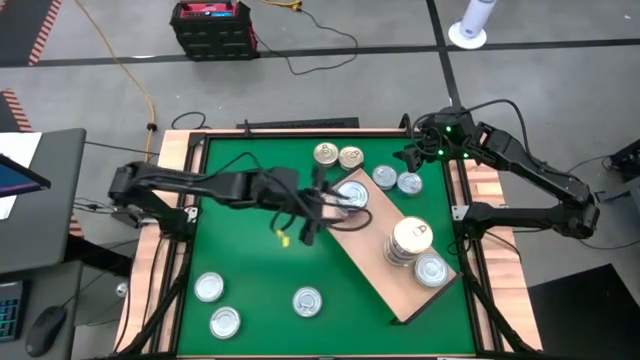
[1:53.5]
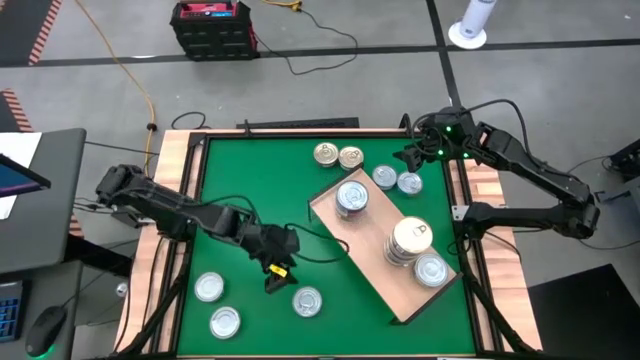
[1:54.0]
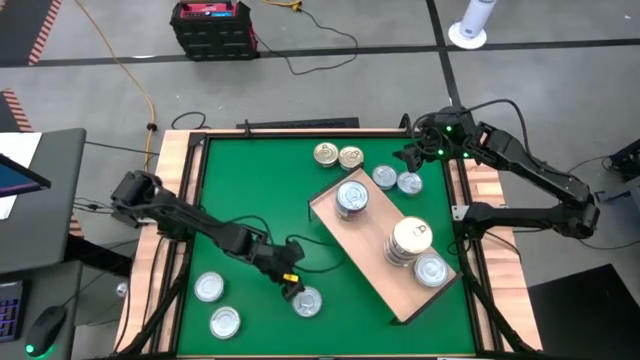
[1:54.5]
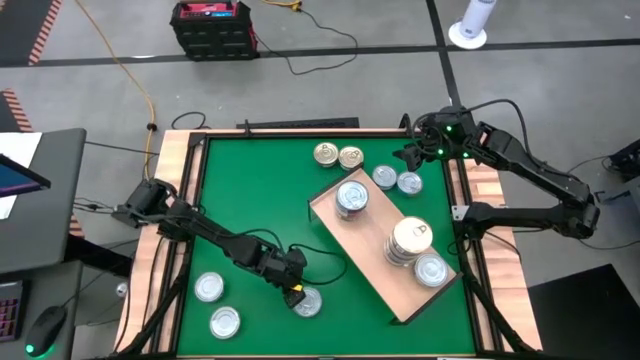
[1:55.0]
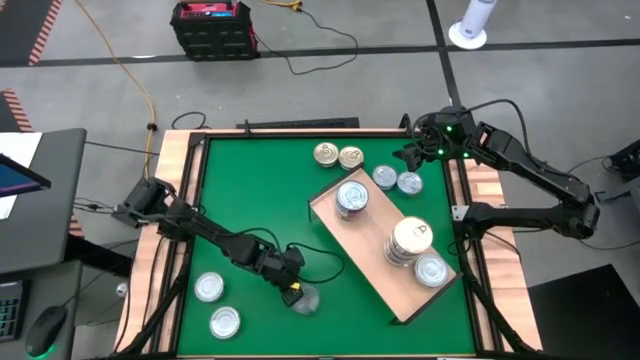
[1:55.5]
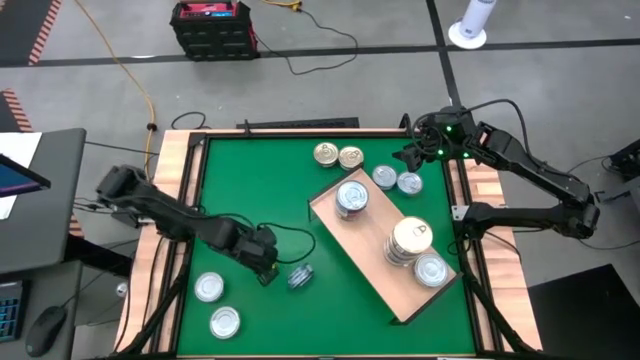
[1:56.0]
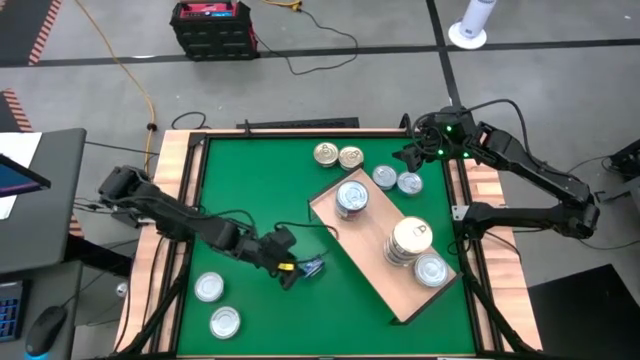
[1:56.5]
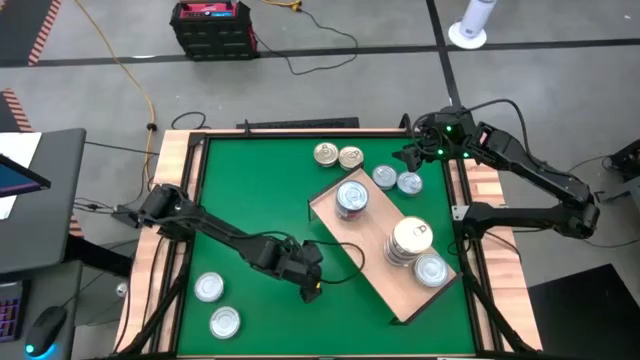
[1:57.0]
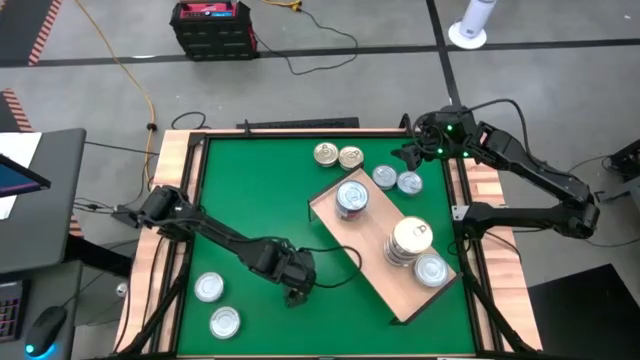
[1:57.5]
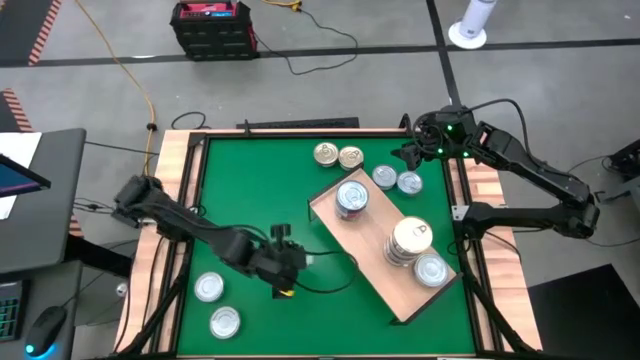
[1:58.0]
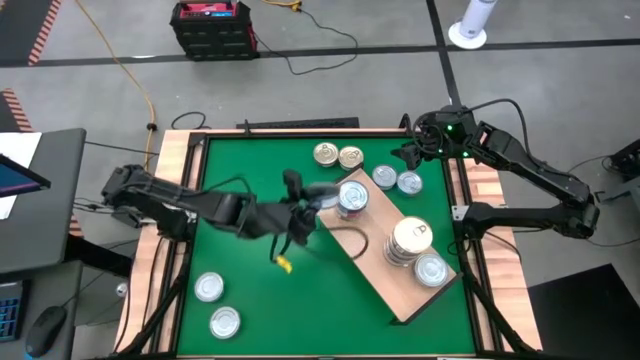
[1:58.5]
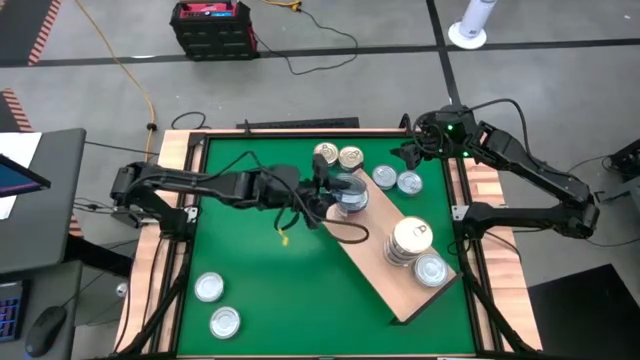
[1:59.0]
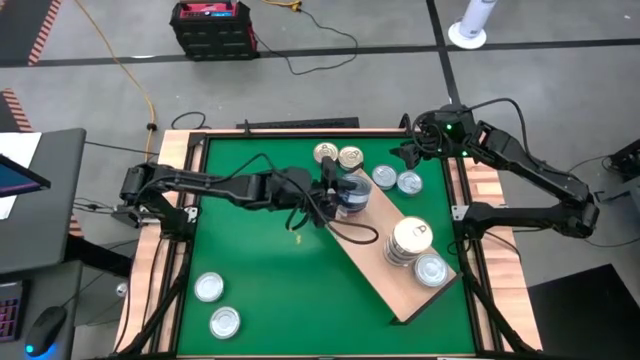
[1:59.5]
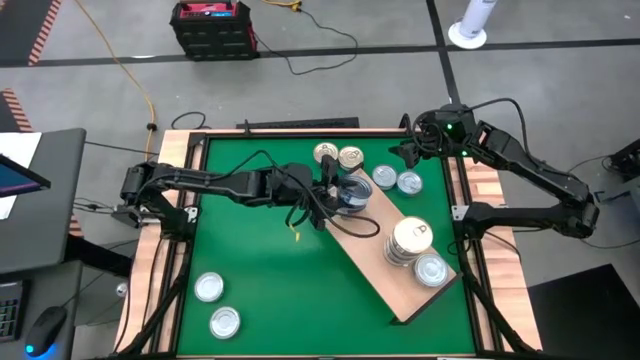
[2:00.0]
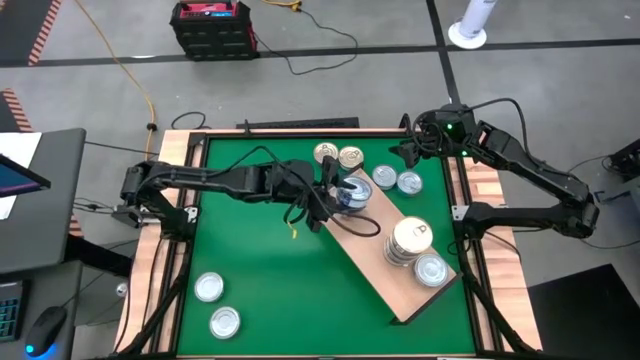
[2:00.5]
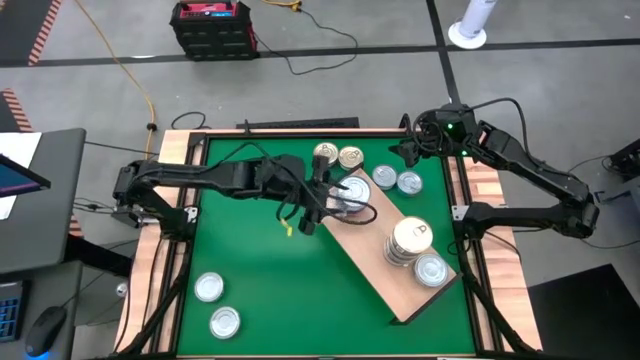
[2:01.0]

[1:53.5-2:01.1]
Task: Stack canned seafood by type on shelf
Stack the blue tuna can on top of the other blue tuna can on the shelf

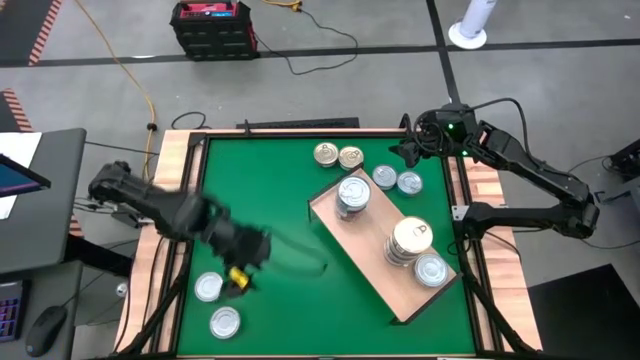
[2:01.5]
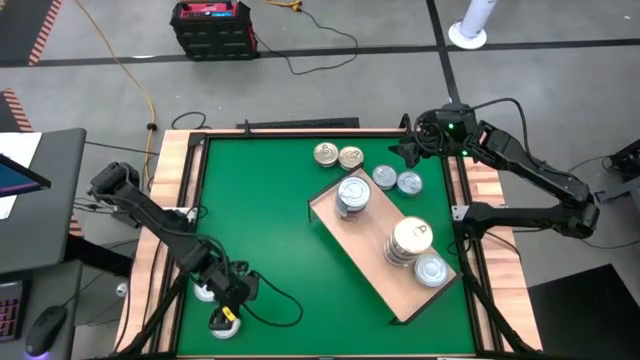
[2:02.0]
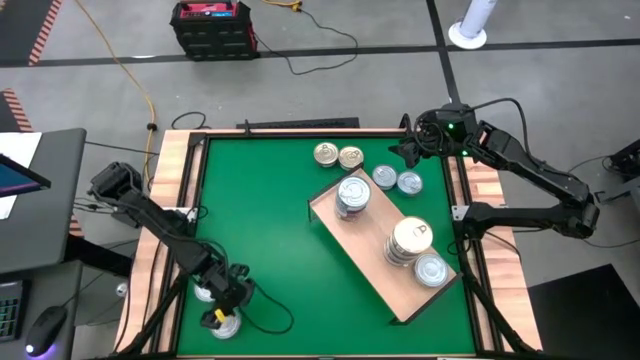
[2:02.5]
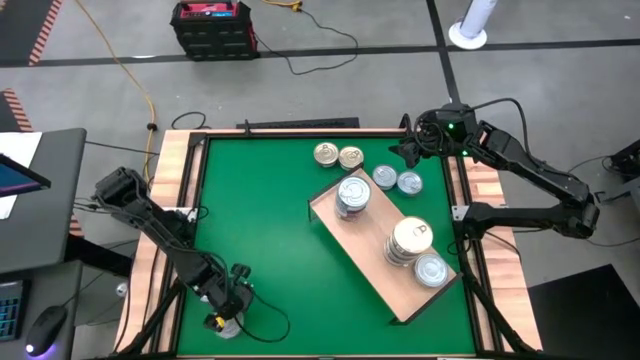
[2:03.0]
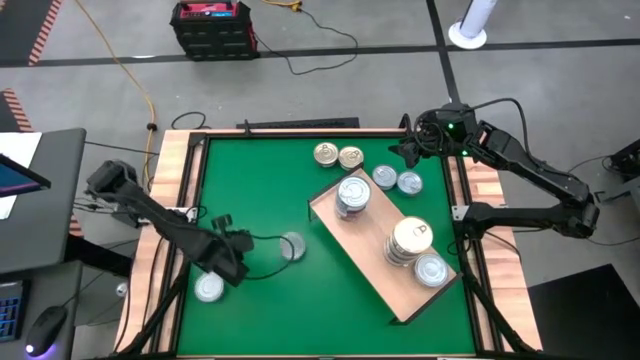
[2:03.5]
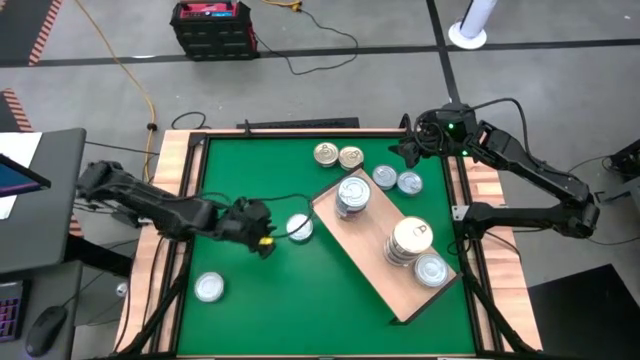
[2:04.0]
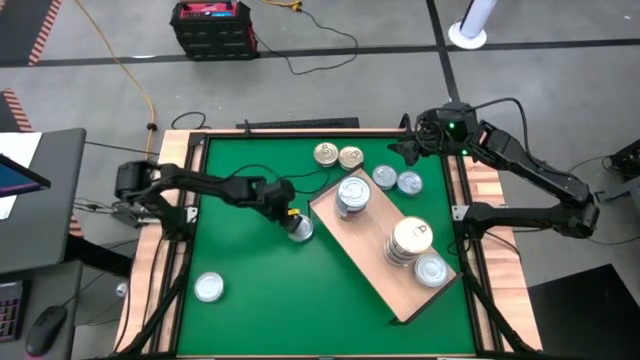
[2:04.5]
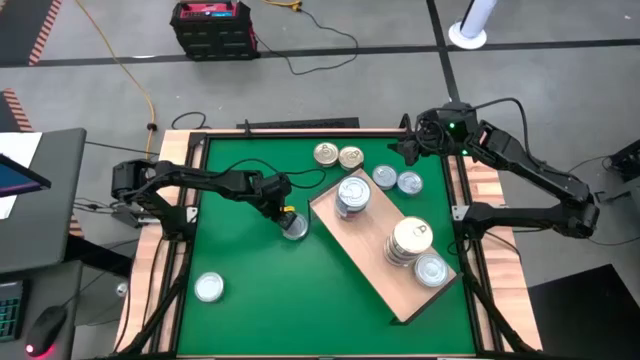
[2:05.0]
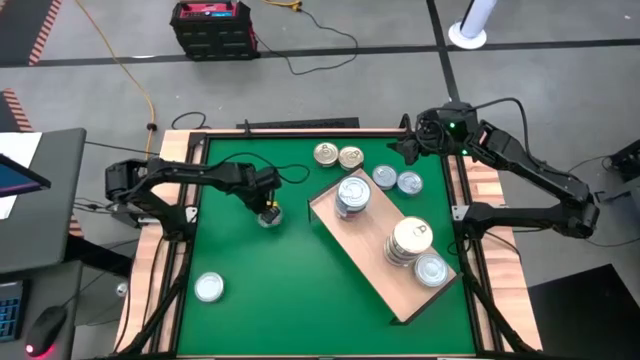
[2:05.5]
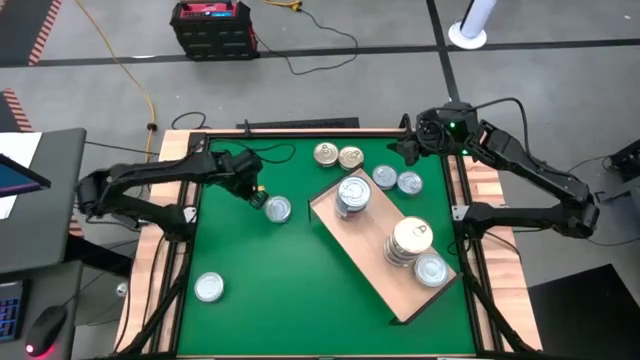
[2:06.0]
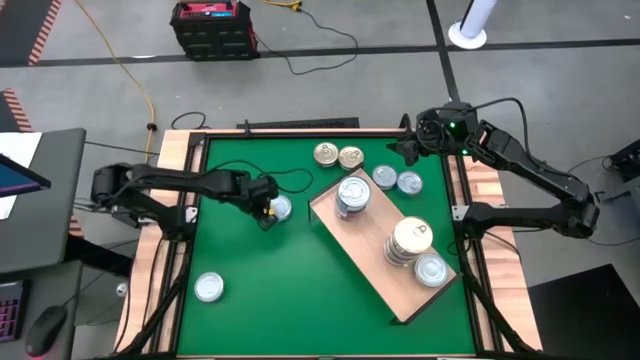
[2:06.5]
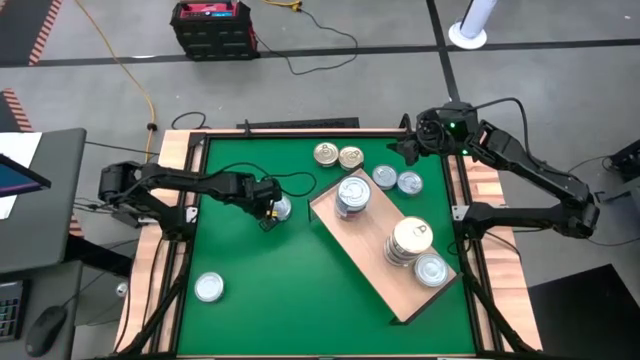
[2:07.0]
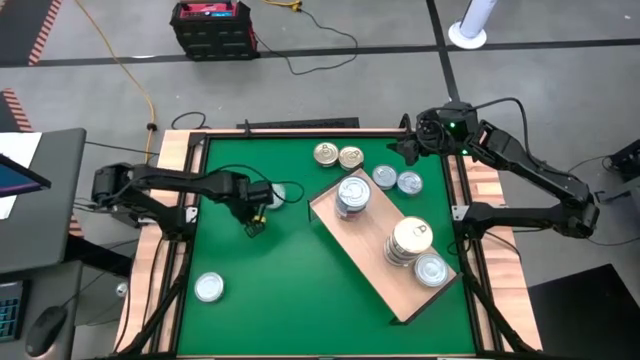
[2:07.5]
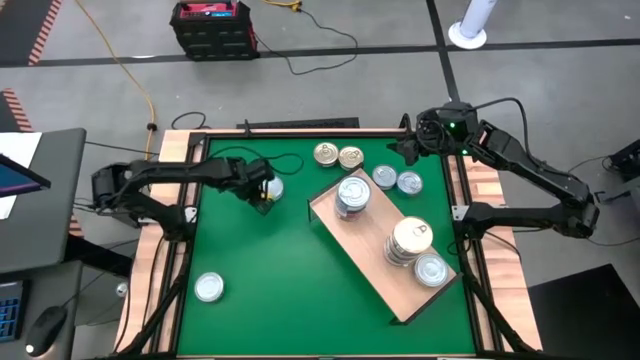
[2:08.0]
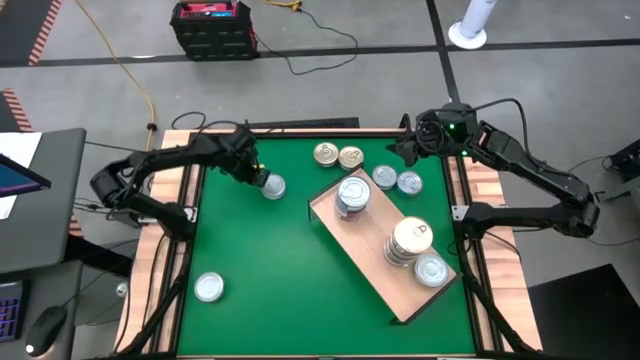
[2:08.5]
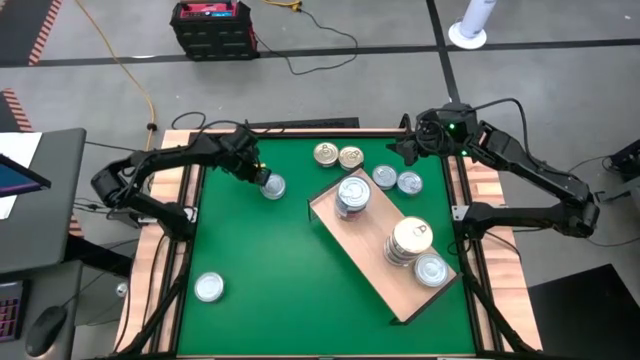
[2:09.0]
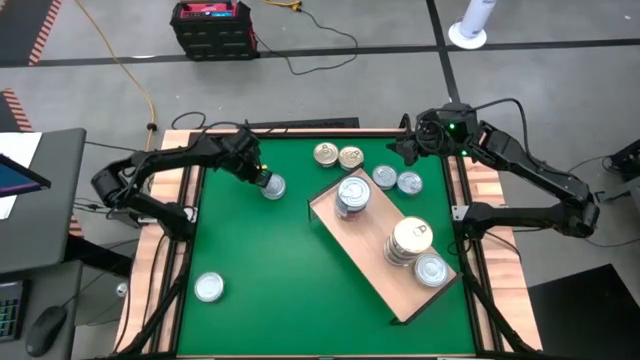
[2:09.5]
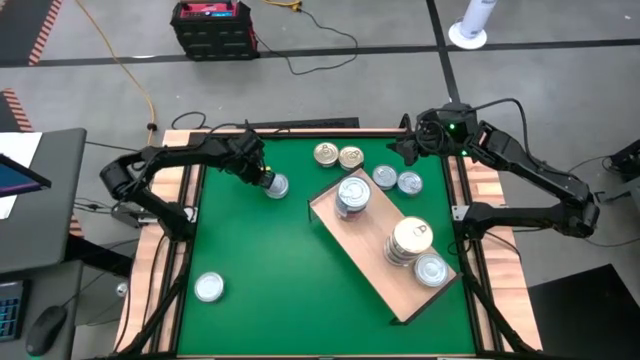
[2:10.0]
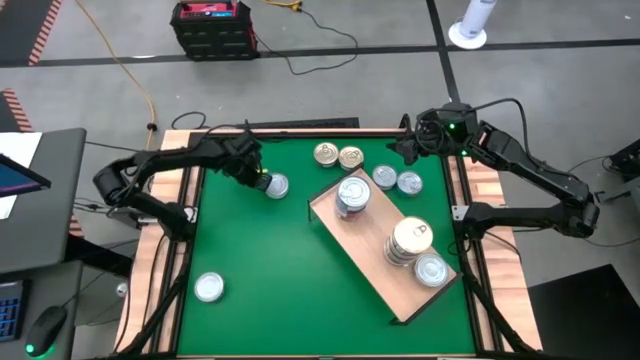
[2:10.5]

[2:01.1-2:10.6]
Stack the light green tuna can on top of the other light green tuna can on the shelf

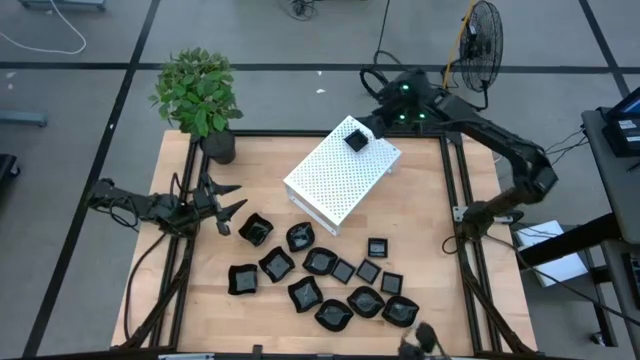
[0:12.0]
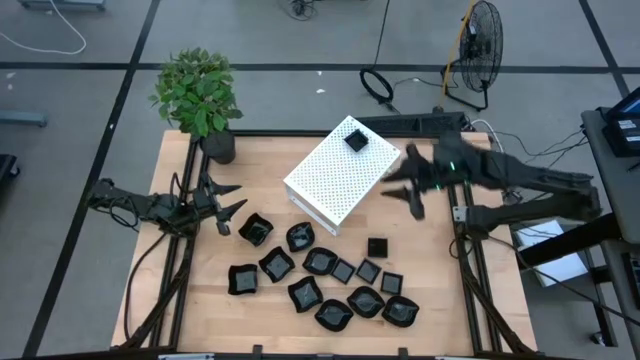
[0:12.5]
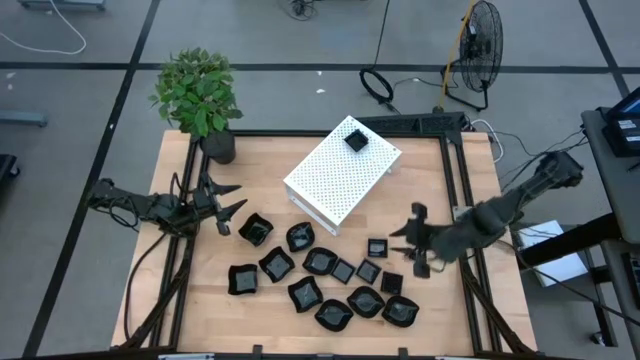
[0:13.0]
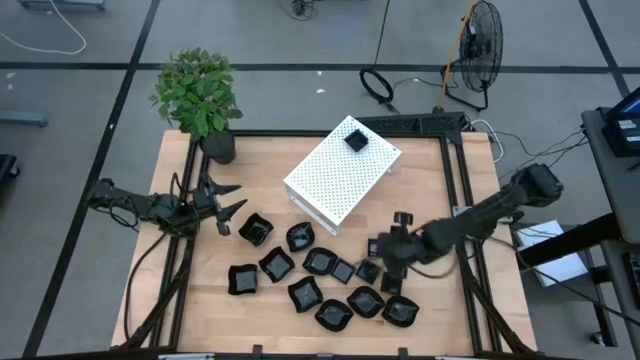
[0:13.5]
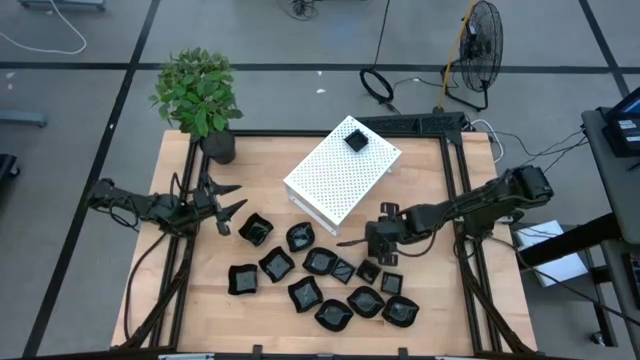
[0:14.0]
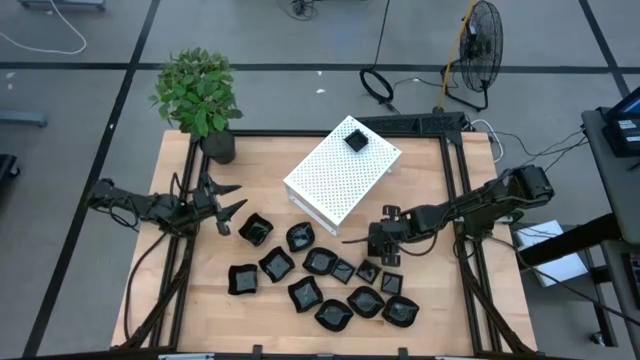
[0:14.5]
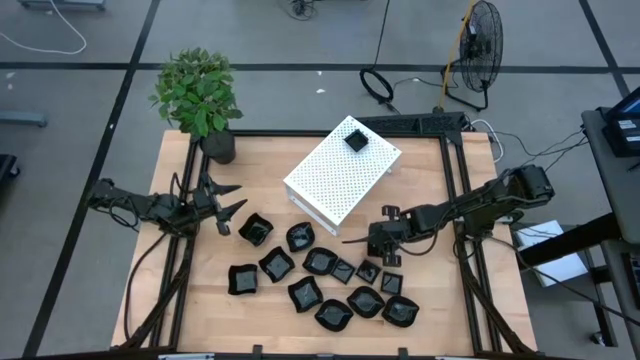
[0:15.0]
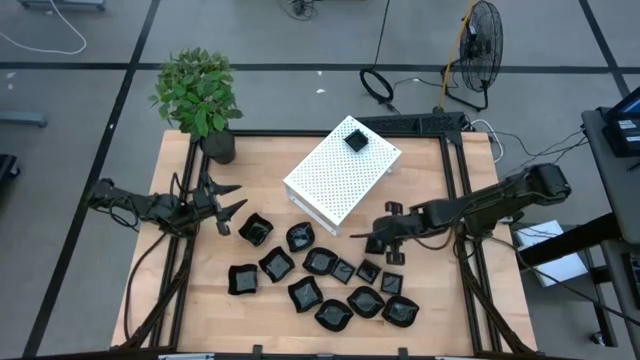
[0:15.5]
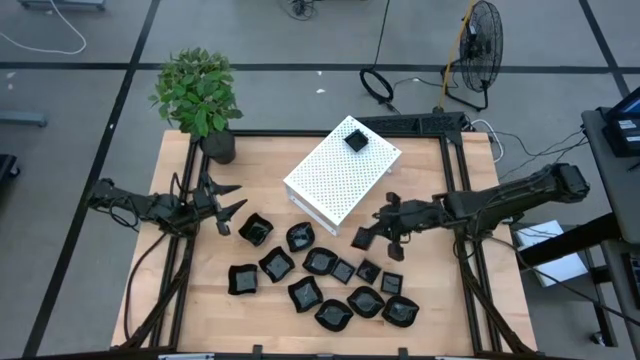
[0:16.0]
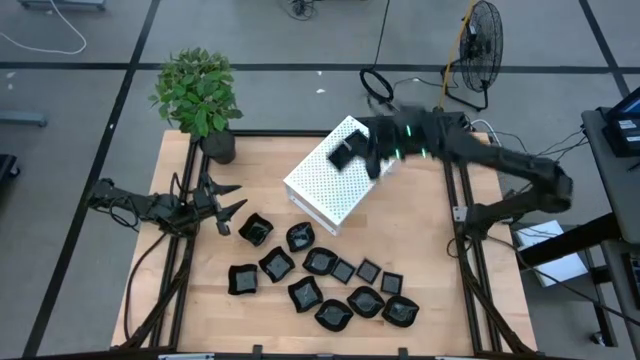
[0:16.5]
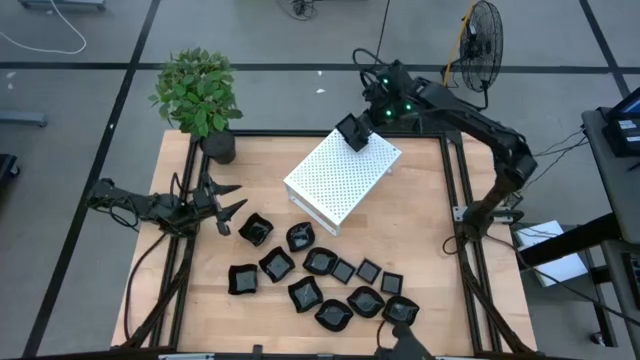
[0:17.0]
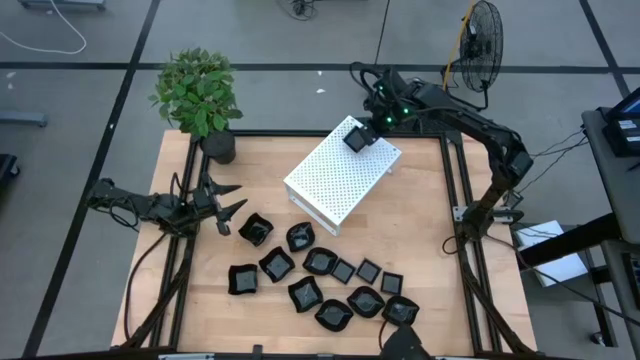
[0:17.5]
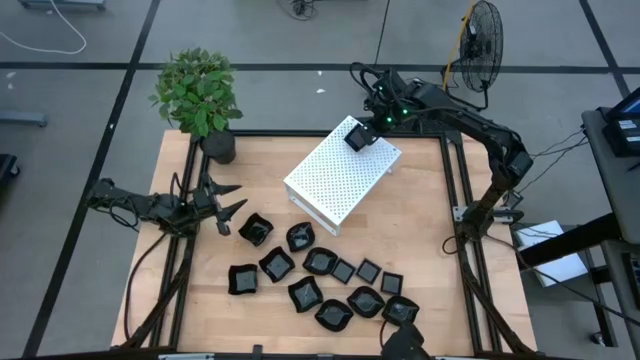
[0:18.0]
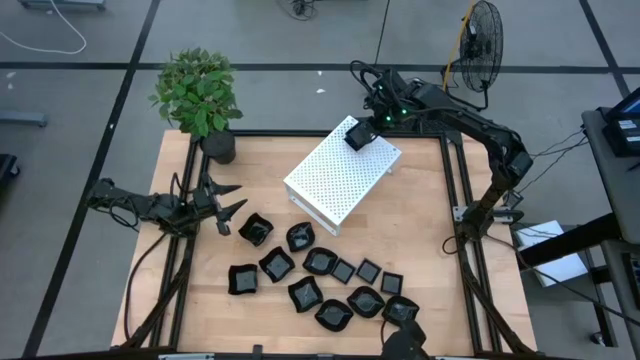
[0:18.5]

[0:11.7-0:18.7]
Task: Pick & Place Mini shaped plates
Stack the black square plate on top of the black square plate on the shelf
